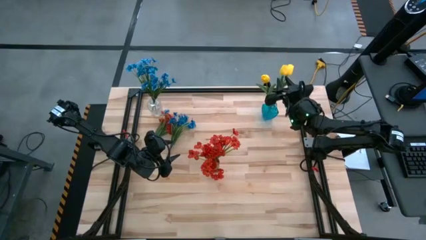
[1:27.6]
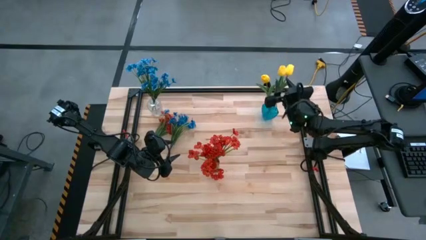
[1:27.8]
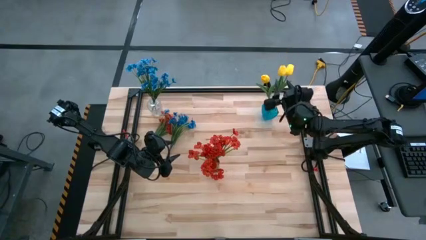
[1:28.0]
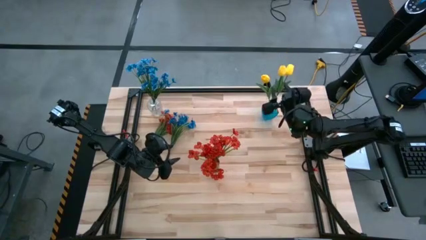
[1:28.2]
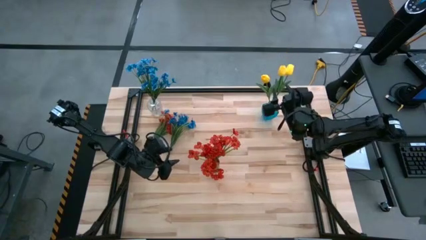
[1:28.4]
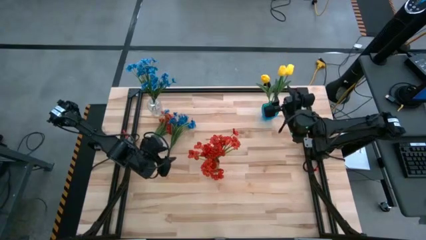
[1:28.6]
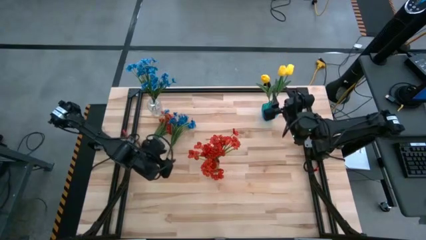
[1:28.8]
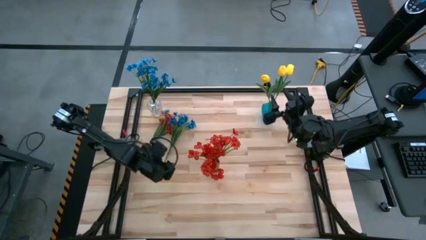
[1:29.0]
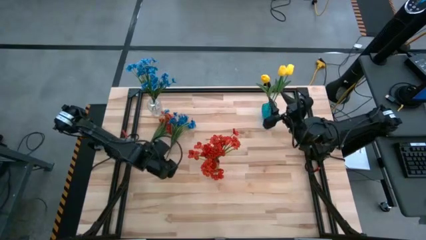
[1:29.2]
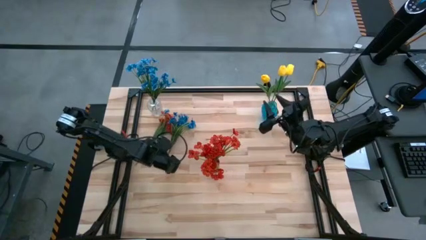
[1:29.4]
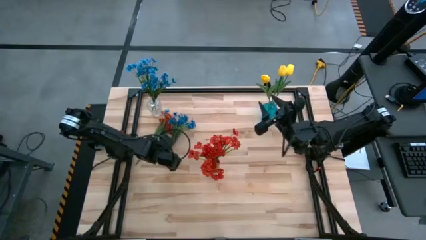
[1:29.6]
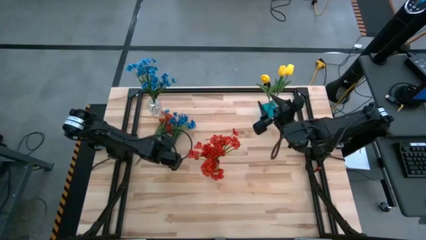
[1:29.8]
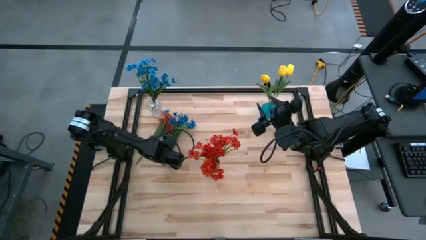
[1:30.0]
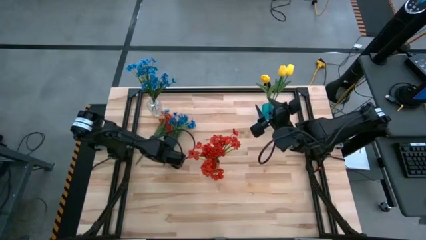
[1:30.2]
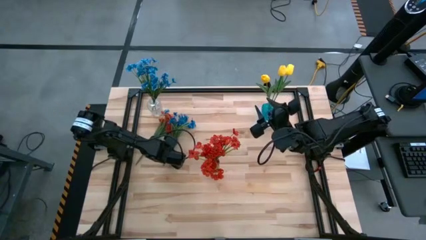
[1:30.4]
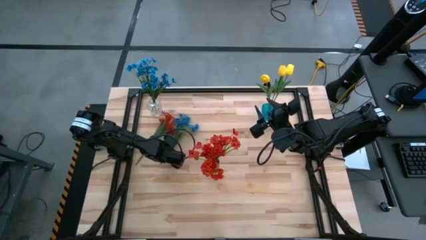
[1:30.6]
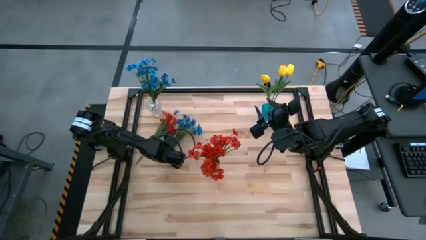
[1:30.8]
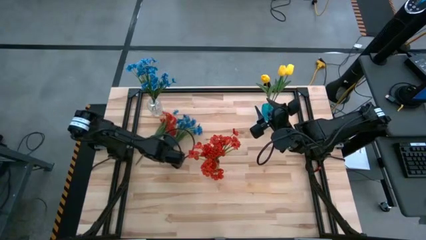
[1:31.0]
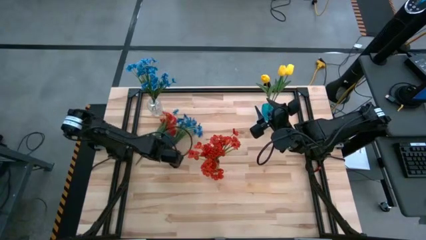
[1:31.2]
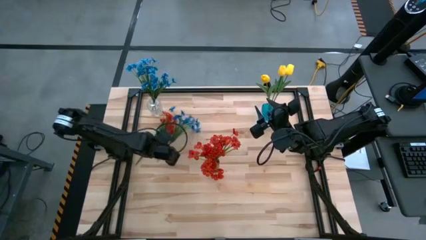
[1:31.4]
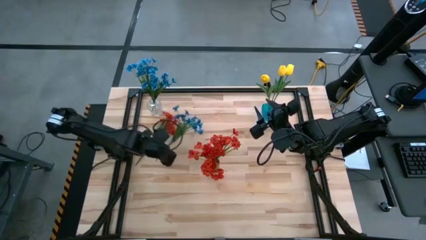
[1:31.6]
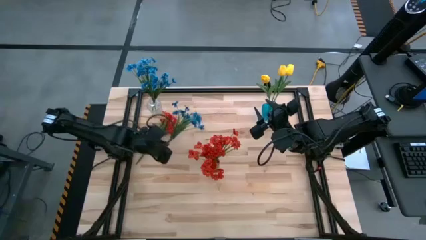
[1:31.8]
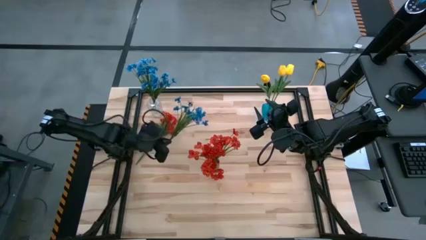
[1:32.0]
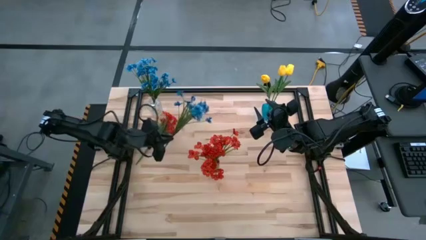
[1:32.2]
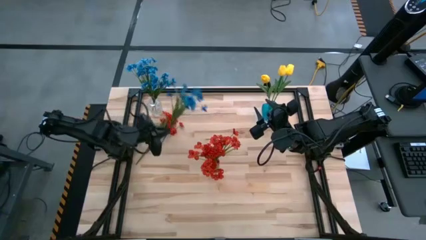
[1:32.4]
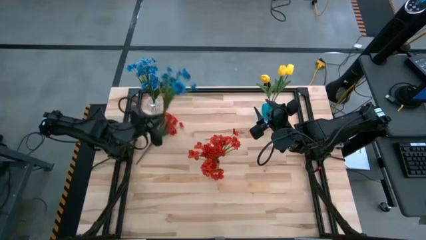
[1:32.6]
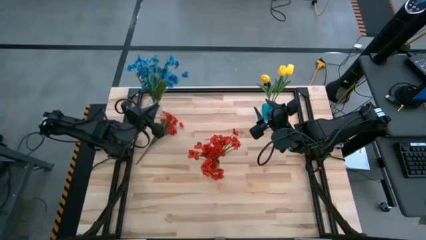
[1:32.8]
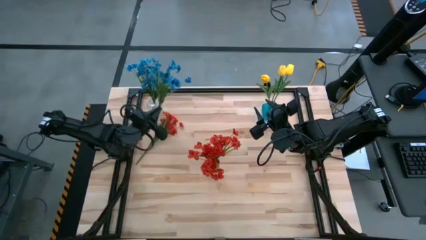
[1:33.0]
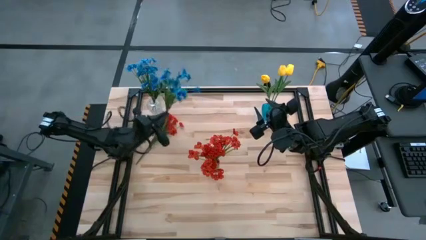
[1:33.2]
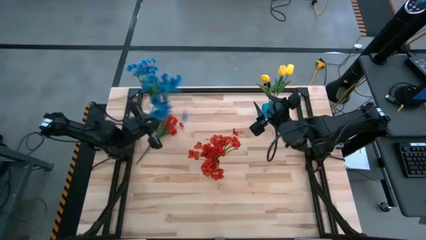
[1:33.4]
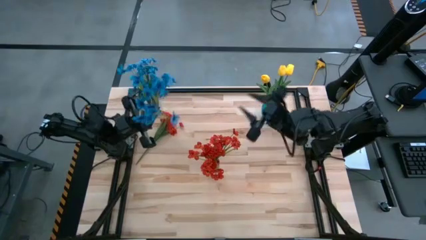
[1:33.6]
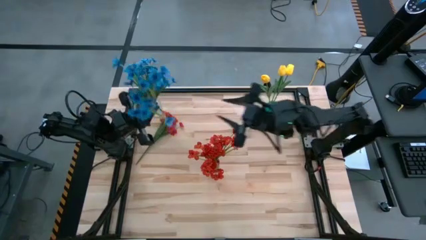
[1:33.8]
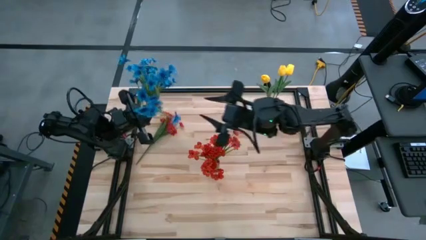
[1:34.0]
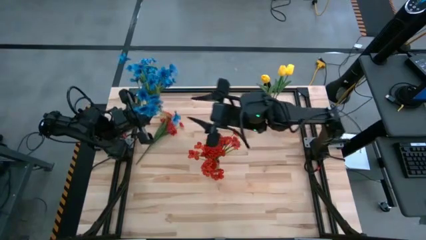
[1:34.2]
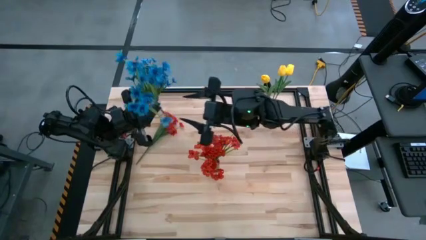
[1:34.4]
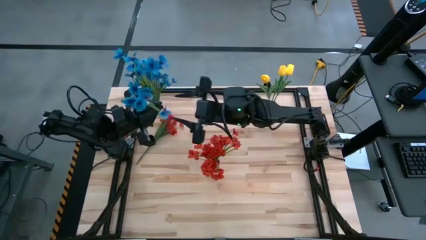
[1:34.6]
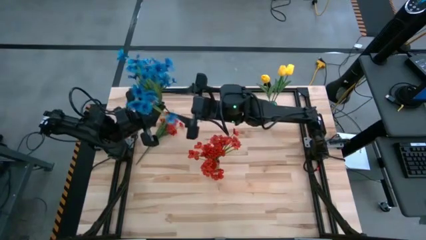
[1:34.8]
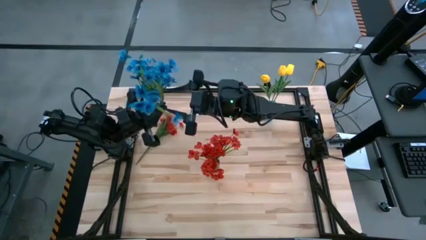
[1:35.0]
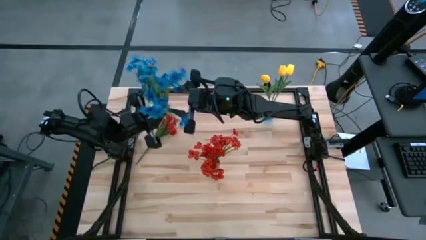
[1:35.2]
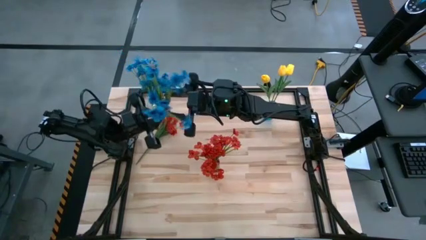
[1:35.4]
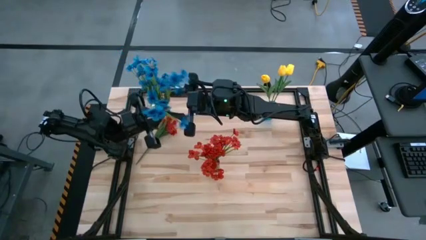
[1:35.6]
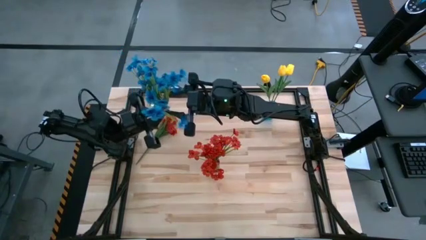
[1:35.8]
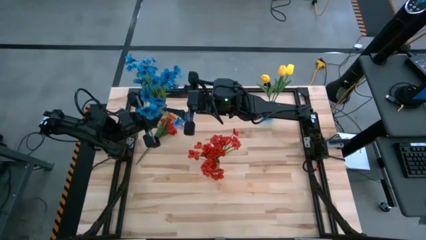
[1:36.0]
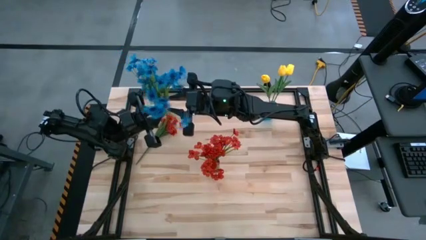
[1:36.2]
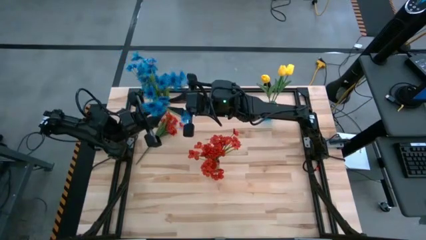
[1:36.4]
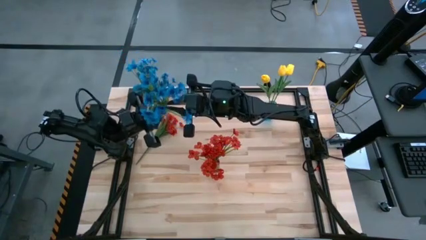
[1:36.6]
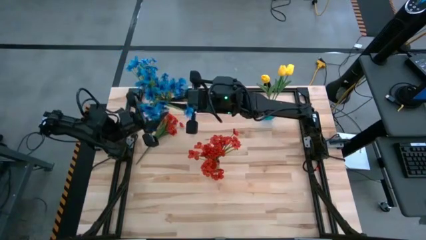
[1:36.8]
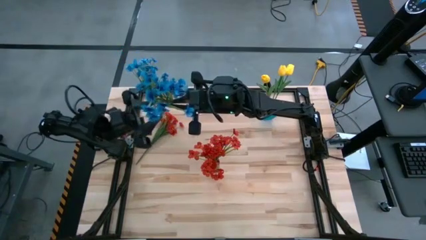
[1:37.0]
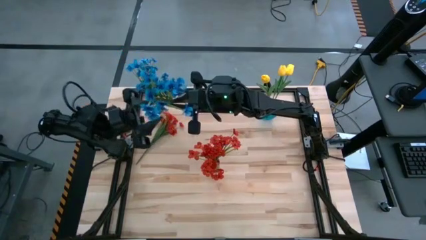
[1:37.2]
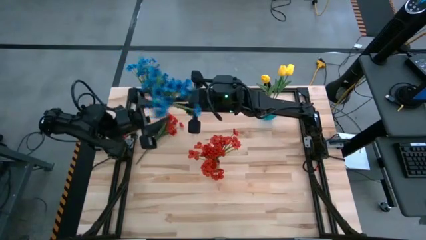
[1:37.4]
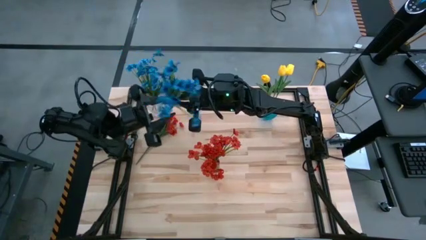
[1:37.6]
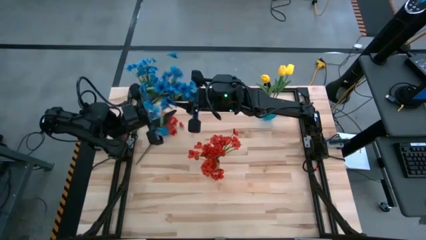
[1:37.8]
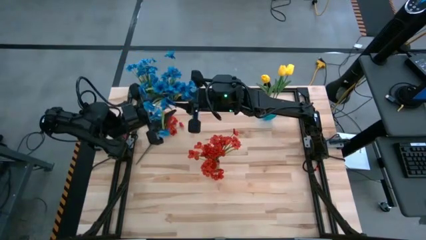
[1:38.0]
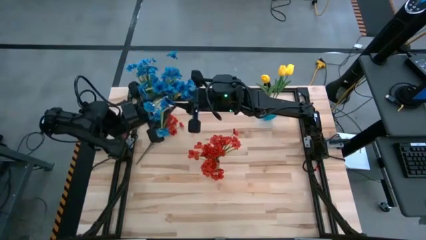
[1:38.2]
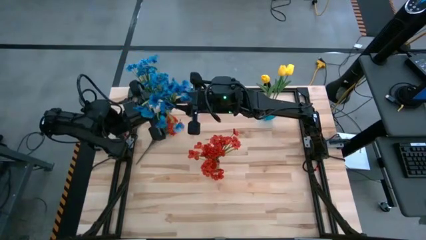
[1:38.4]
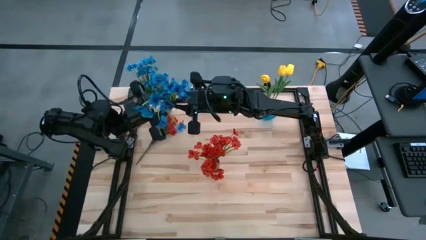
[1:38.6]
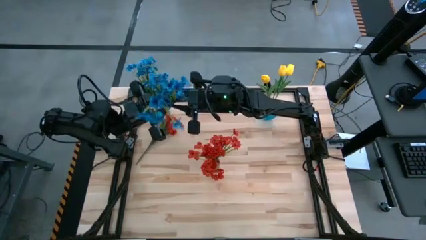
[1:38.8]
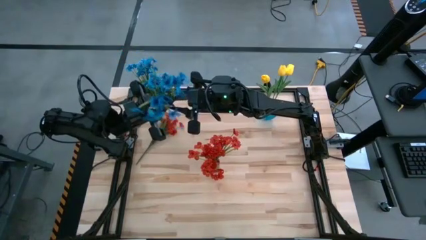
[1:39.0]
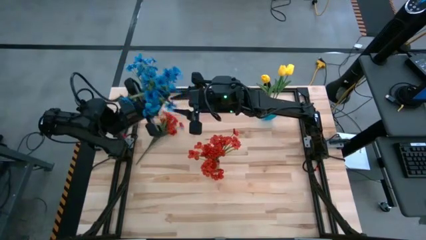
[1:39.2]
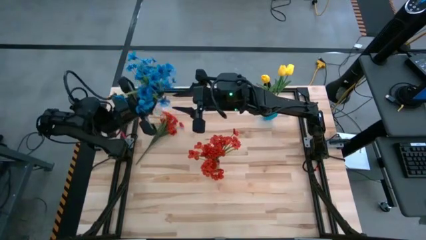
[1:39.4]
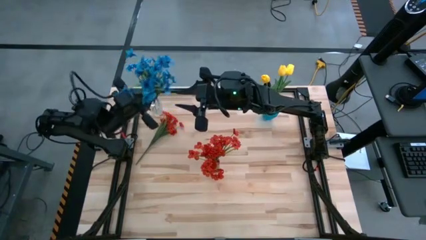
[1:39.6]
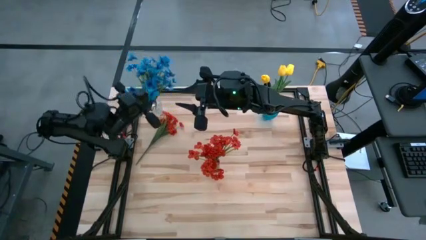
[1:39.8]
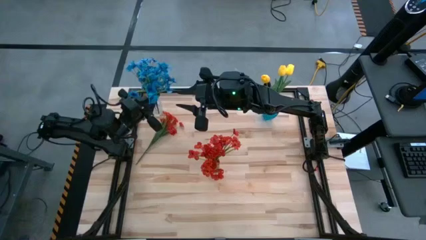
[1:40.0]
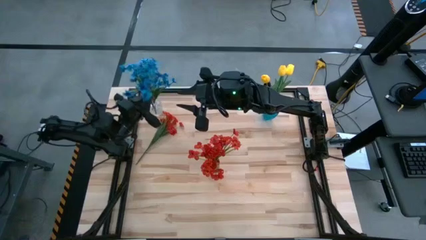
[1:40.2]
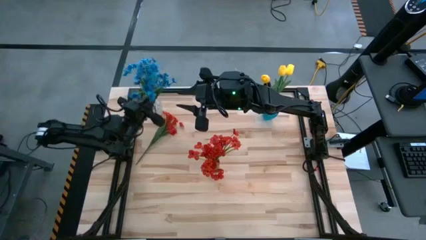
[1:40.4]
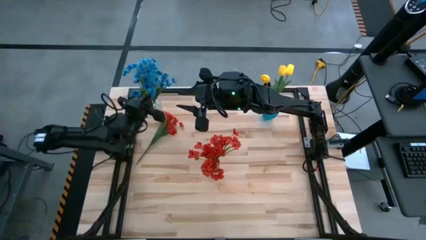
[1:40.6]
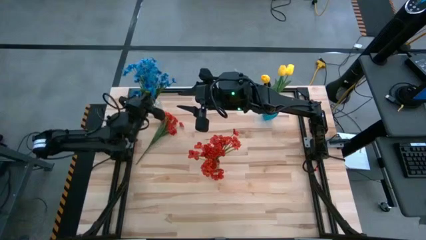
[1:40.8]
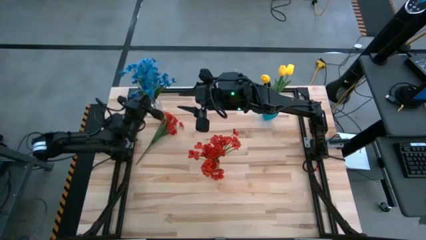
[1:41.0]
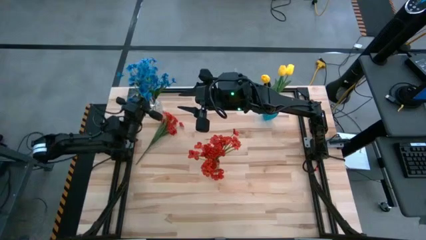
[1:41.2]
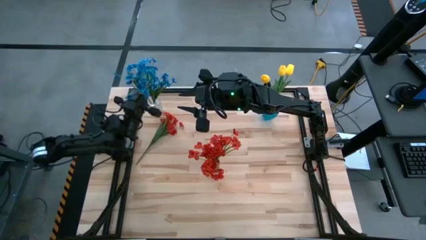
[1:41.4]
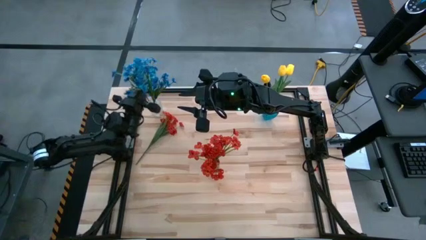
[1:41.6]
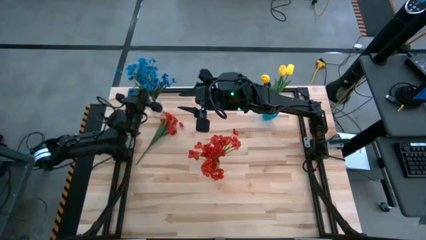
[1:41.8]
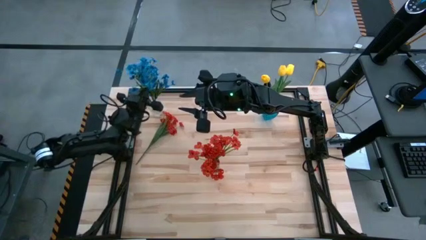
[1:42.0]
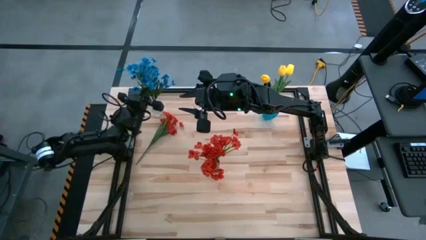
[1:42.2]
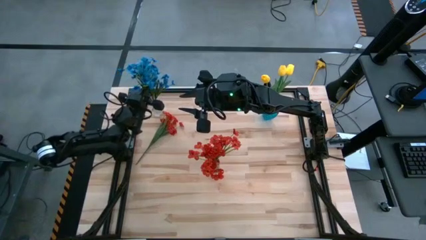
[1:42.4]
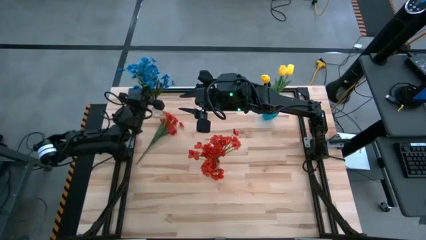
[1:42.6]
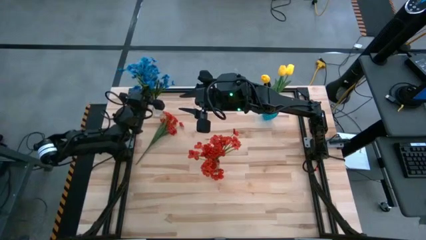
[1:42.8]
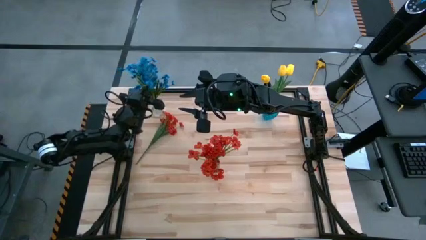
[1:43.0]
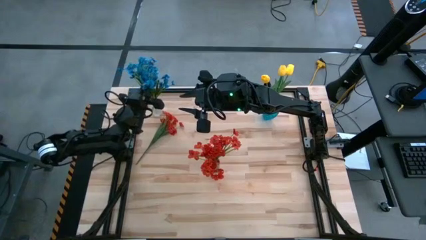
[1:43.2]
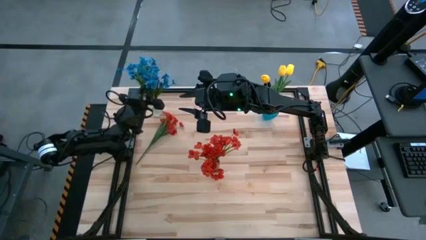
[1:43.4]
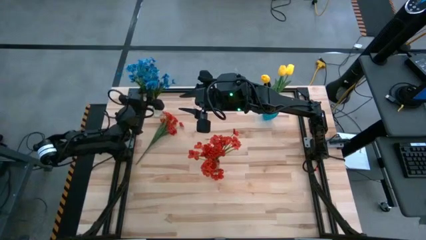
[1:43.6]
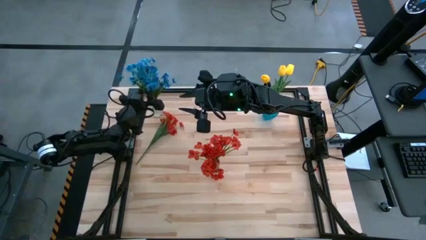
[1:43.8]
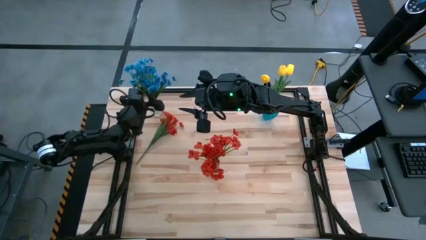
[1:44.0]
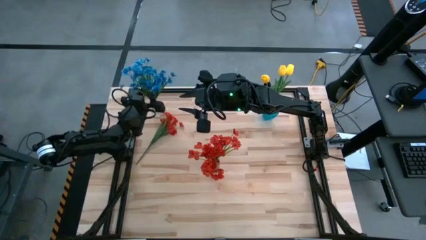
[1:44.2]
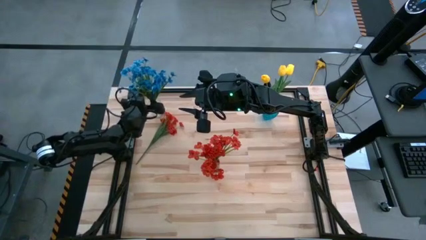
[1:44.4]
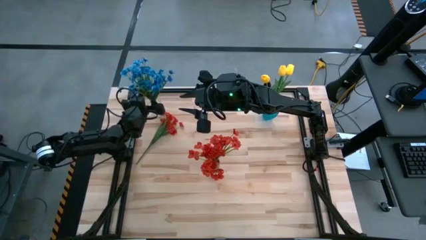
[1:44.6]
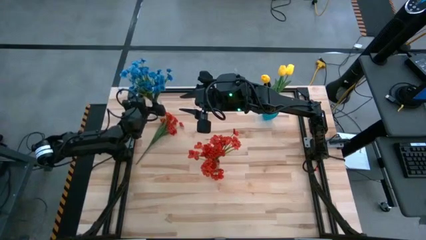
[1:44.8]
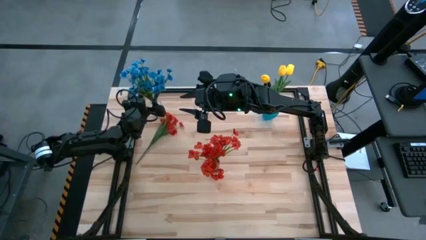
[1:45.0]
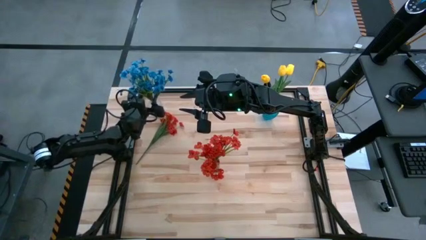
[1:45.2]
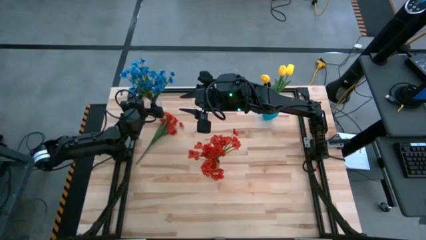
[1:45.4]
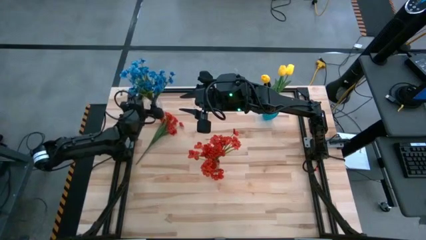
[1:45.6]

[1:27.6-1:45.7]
Task: Sort flowers into vase by color
Put the blue flowers into the transparent vase
